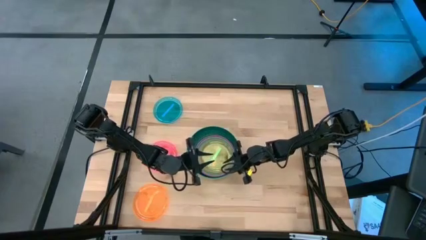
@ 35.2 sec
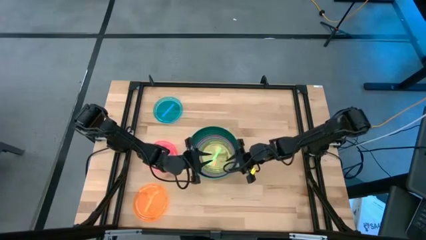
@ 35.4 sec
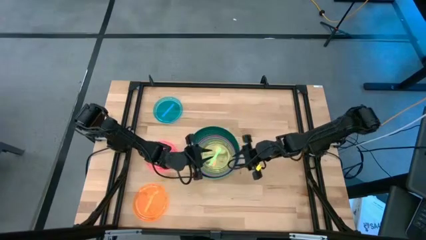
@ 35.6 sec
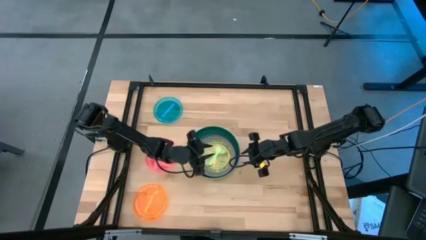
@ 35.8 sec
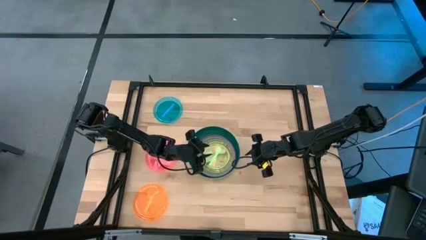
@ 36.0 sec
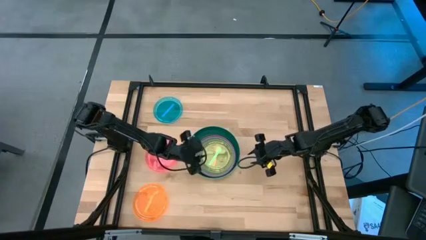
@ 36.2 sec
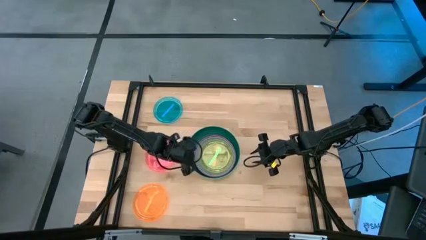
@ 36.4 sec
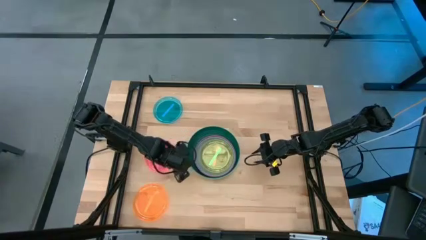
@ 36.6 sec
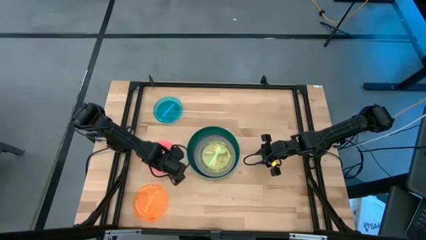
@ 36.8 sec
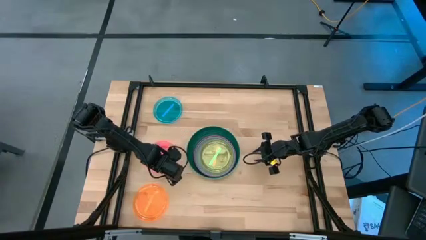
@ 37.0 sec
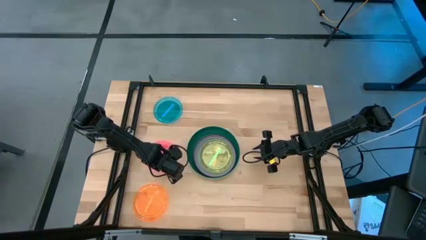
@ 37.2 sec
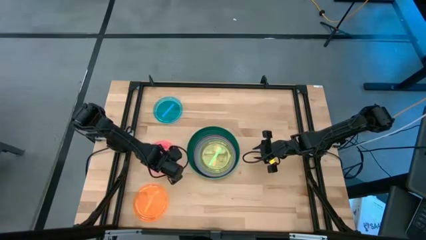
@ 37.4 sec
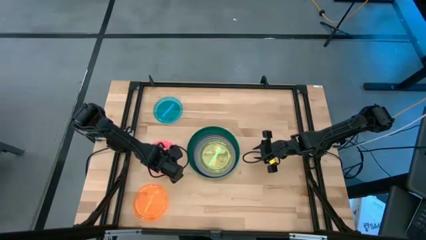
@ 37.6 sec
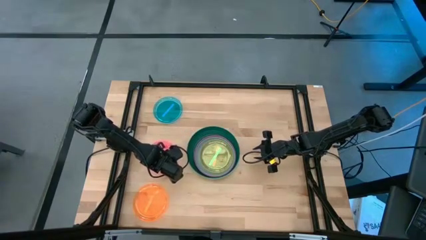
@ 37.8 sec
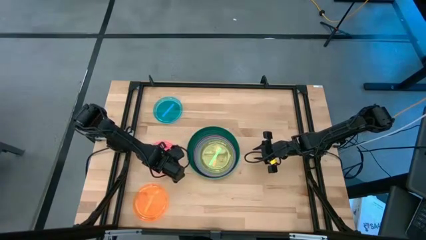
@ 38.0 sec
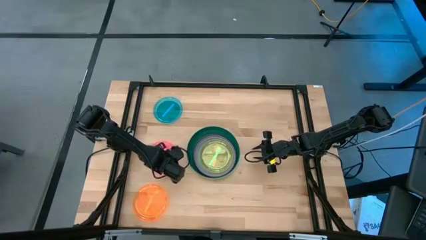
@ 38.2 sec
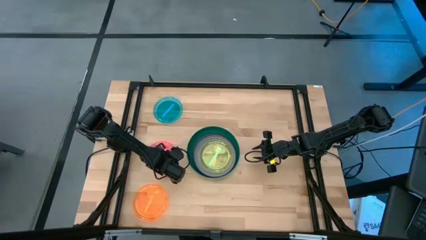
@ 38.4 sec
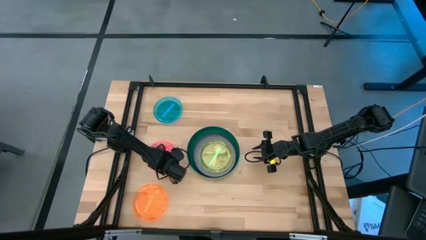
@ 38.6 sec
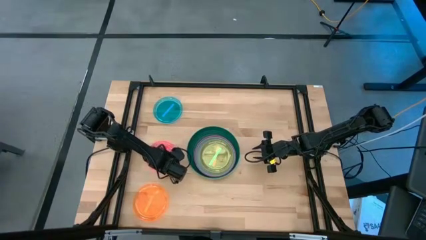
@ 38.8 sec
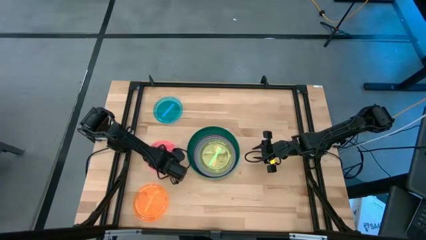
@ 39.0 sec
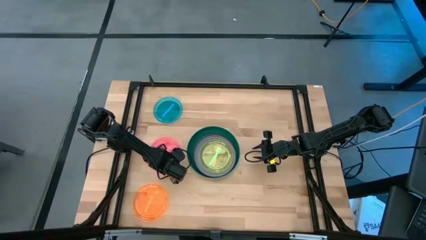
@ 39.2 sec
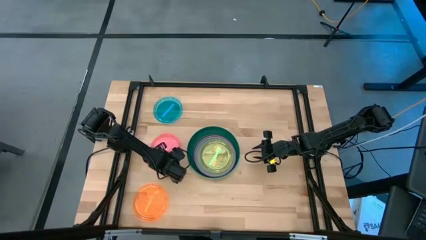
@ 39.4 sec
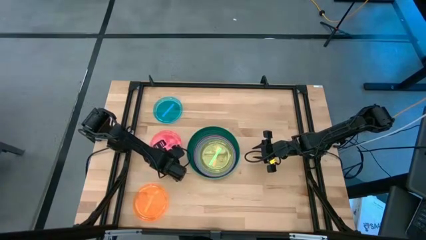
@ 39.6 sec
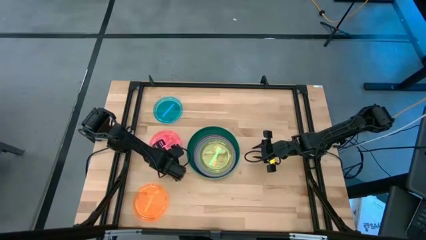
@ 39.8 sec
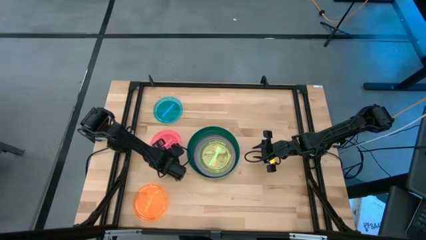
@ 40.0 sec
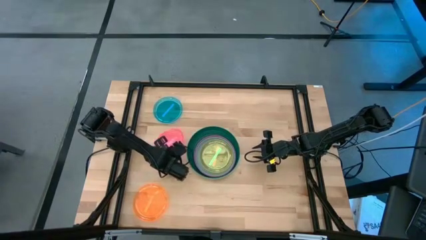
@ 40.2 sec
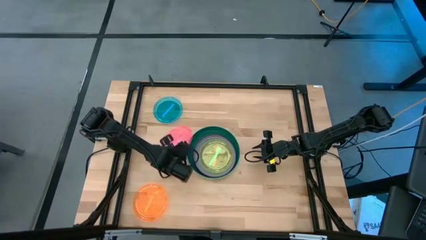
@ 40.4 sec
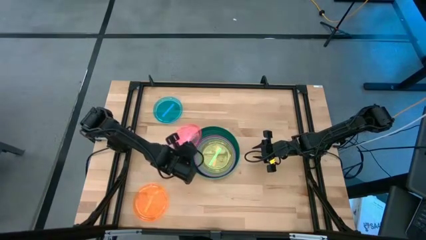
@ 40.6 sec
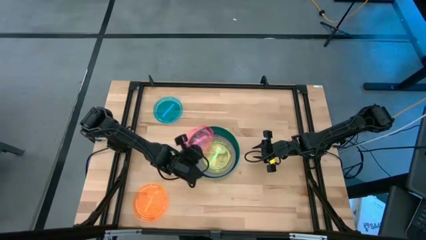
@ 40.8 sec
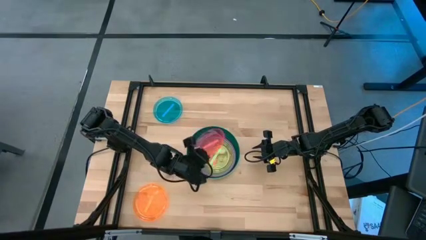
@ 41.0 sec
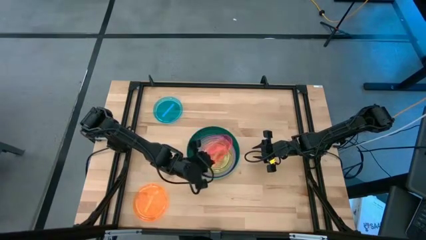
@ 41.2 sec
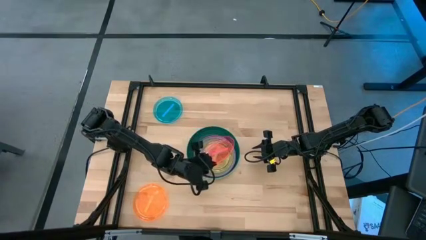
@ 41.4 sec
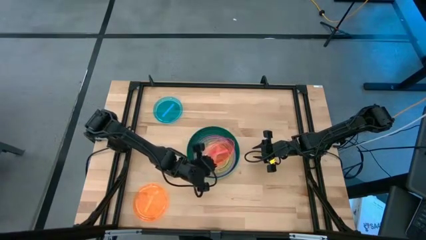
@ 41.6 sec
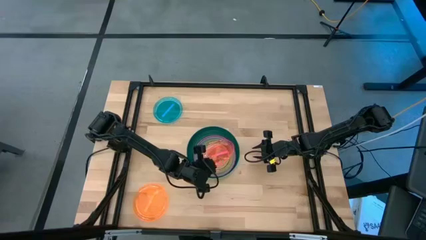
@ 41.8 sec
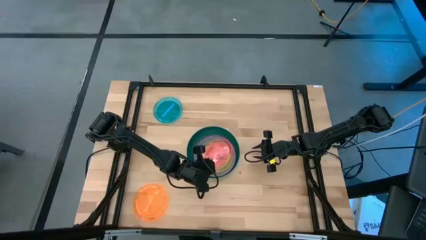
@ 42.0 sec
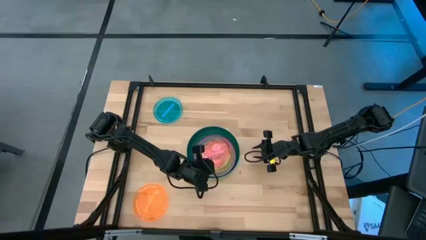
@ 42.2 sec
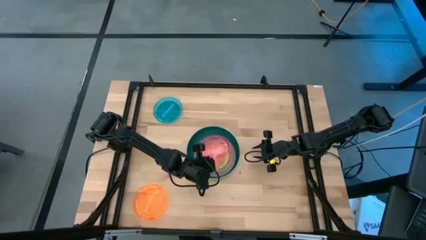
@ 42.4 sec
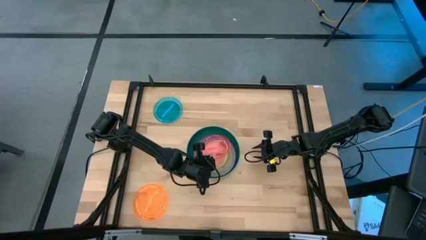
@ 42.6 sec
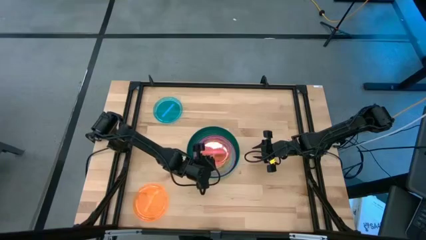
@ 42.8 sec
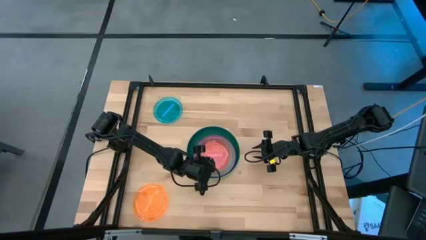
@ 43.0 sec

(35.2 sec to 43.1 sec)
Task: Stack plastic plates
Stack the pink plate on top of the green plate

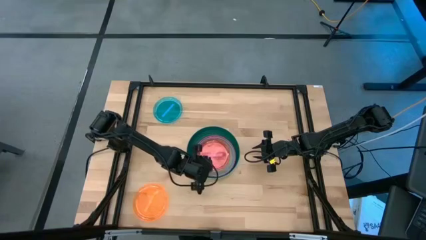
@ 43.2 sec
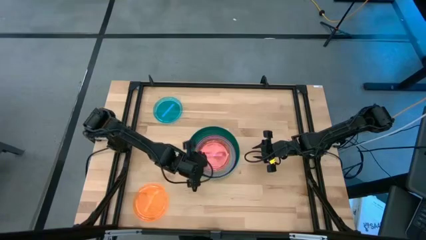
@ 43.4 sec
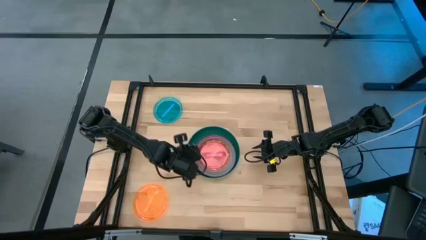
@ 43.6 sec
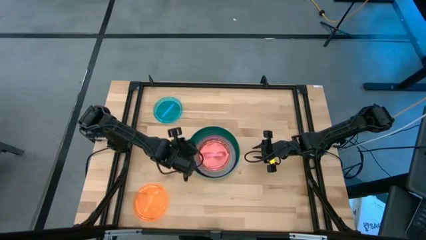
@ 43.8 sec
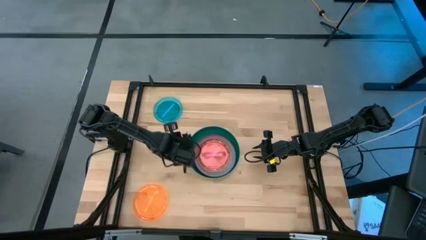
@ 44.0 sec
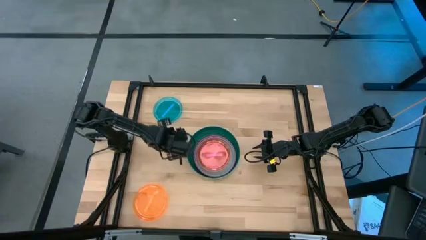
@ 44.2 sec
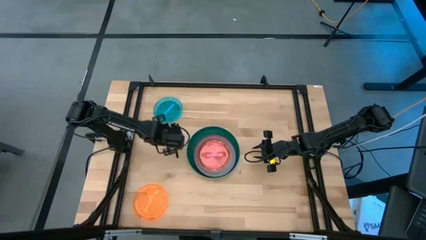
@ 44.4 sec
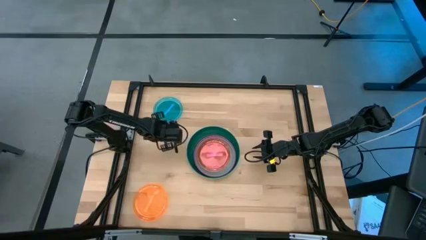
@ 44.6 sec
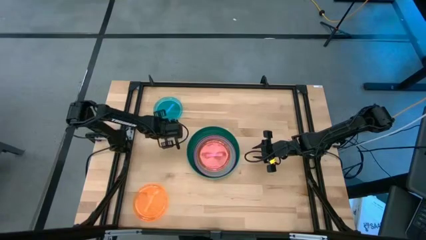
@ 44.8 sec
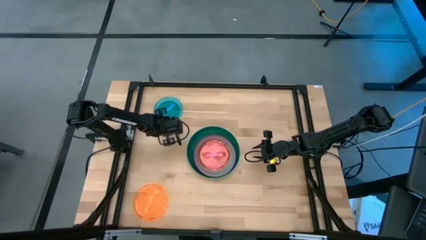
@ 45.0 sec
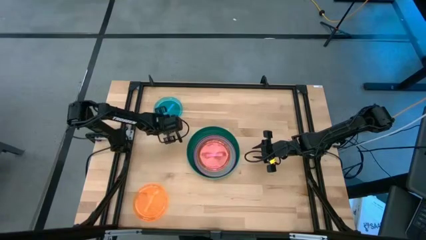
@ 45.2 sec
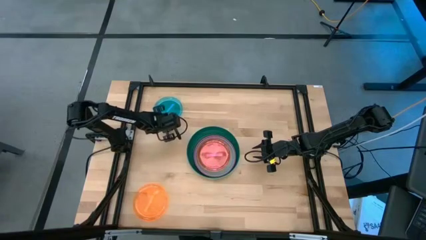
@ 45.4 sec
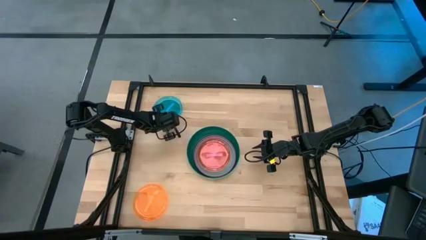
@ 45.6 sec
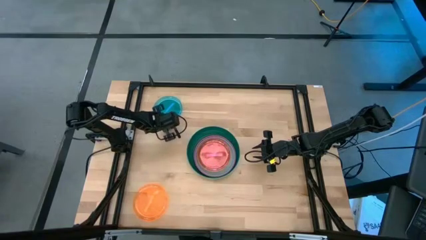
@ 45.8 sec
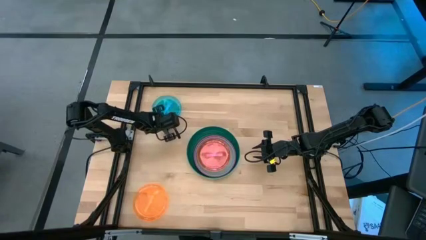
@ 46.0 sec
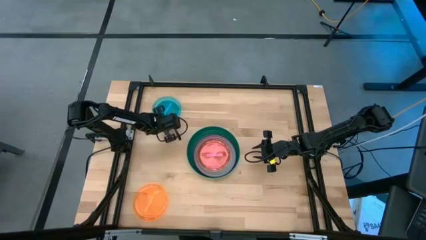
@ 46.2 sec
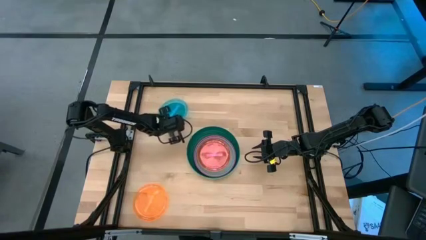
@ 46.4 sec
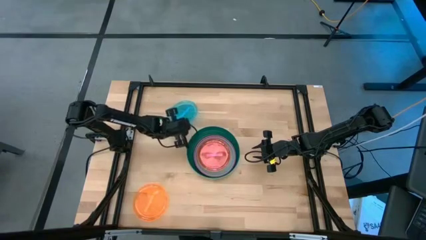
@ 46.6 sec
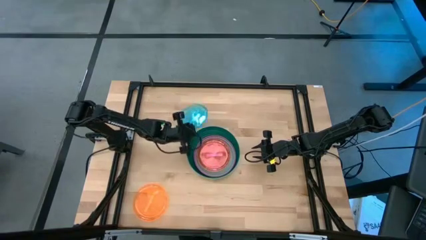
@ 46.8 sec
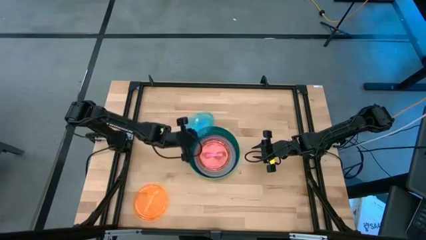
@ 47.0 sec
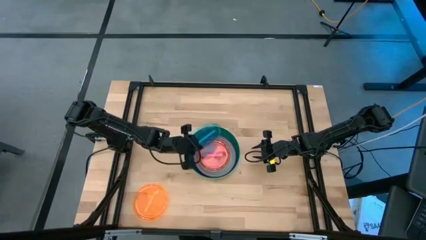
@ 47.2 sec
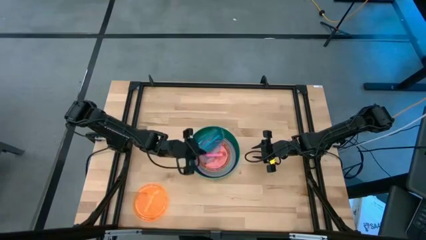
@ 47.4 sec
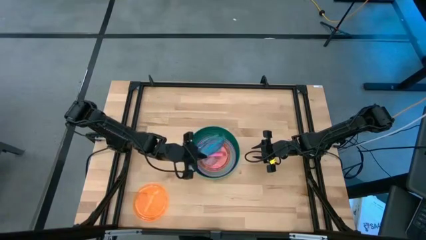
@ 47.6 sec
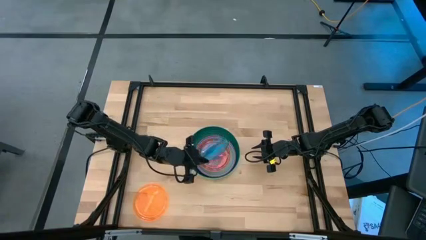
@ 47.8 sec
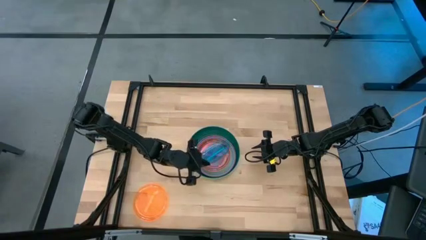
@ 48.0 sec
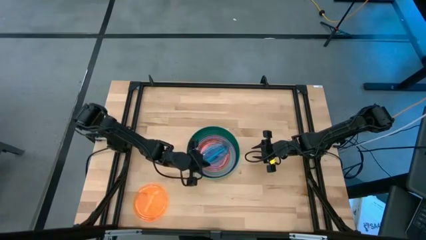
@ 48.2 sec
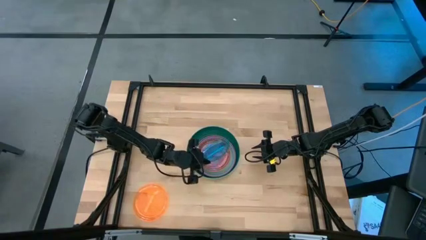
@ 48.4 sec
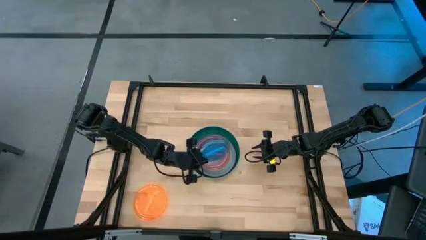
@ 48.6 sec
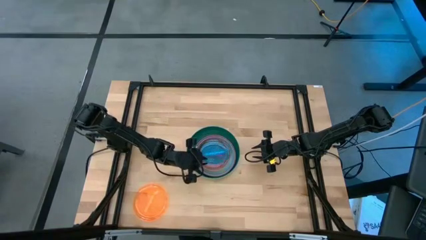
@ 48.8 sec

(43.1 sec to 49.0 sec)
Stack the blue plate on top of the pink plate

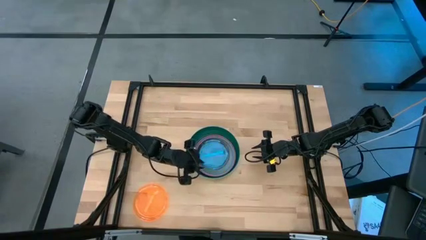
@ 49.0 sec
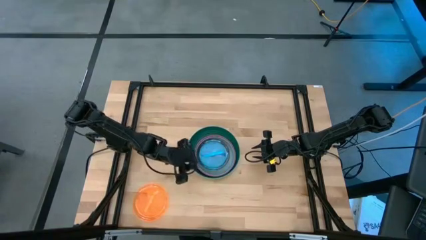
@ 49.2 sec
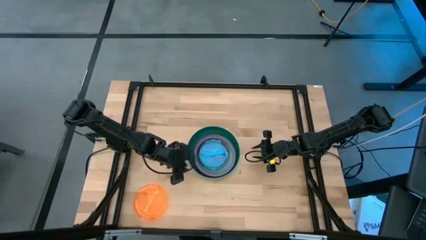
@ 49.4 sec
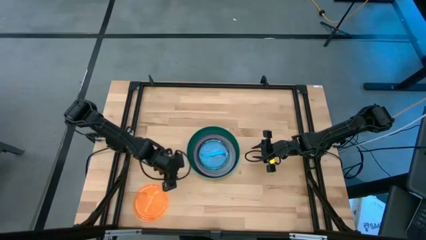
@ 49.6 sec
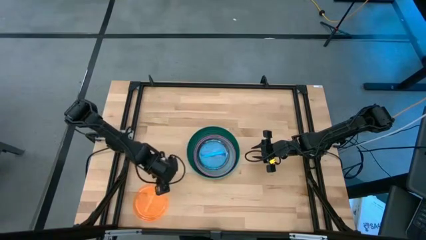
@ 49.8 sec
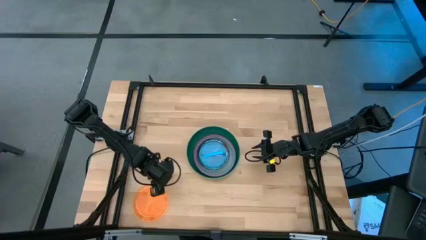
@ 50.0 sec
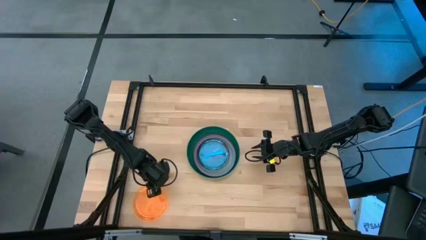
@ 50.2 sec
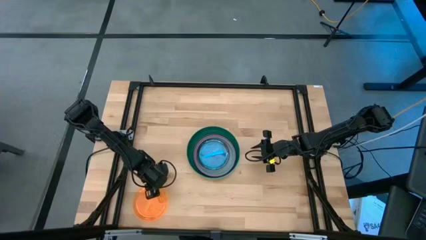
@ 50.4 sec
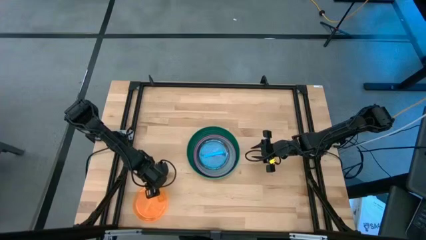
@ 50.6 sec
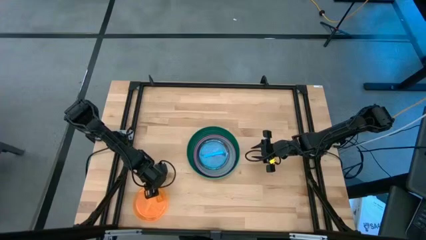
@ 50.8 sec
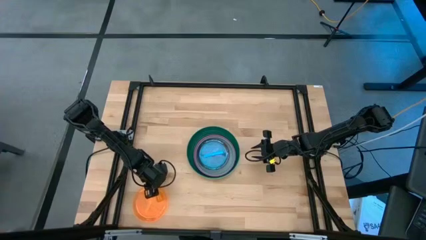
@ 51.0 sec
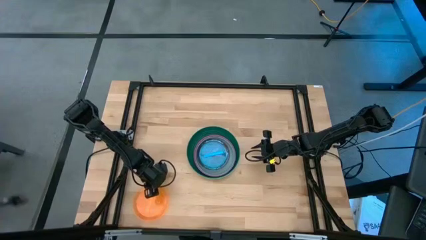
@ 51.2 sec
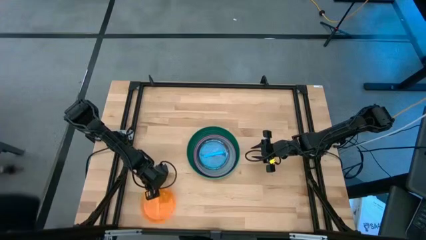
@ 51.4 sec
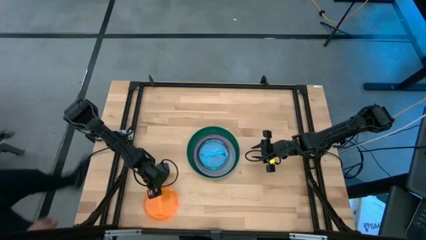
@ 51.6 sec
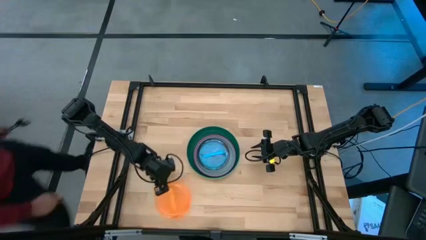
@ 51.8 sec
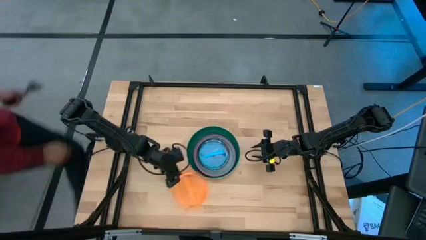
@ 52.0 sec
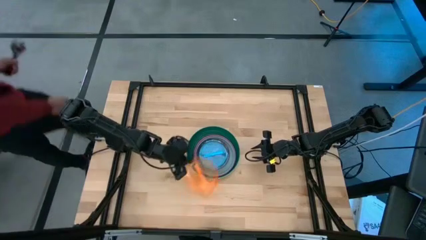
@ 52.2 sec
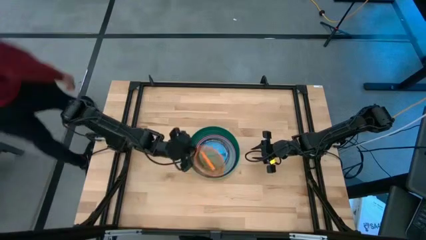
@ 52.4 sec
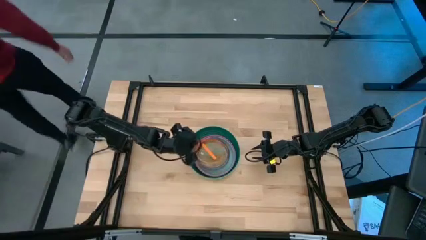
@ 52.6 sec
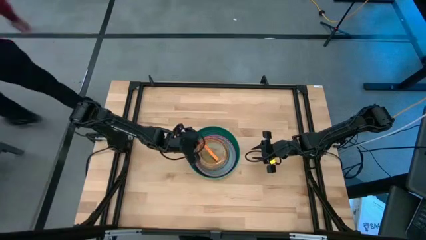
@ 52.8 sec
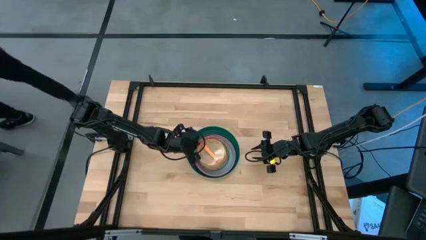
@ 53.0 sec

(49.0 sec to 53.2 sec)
Stack the orange plate on top of the blue plate
